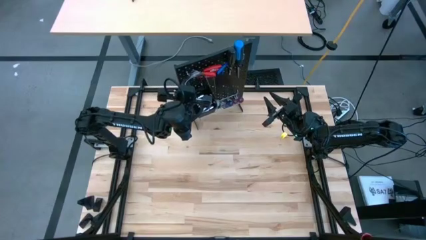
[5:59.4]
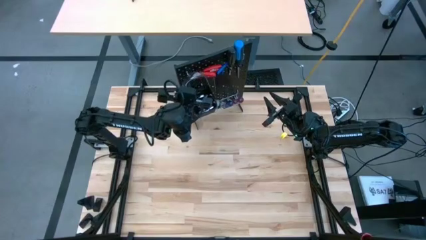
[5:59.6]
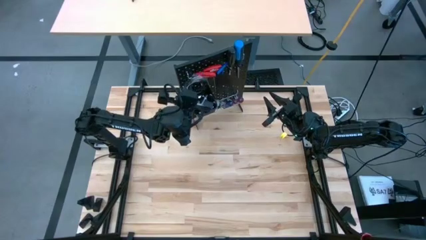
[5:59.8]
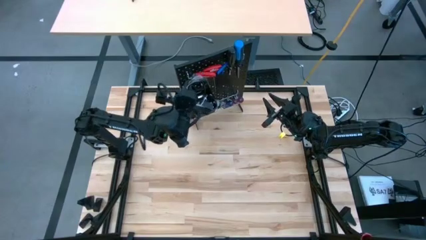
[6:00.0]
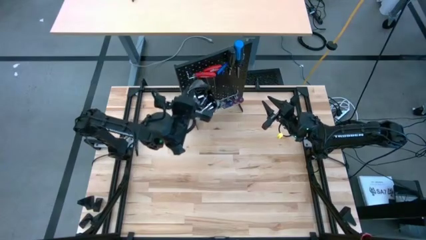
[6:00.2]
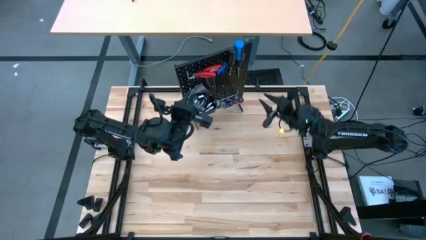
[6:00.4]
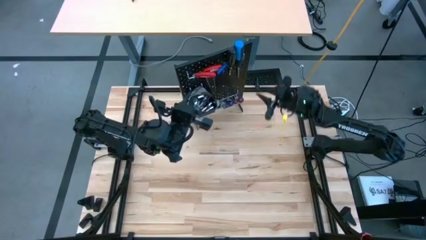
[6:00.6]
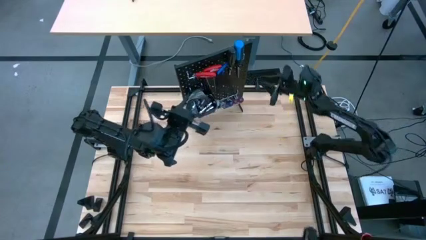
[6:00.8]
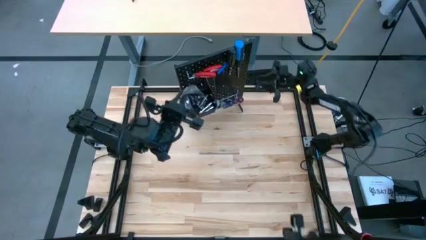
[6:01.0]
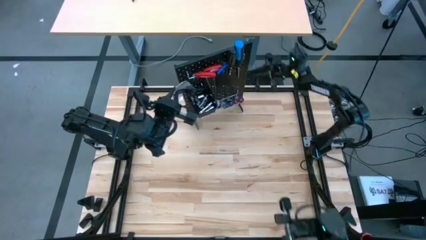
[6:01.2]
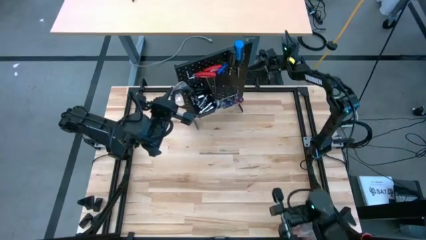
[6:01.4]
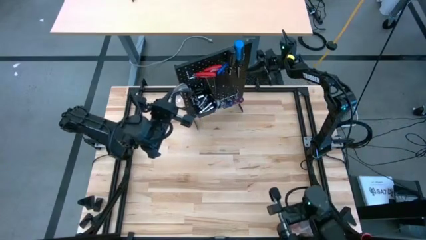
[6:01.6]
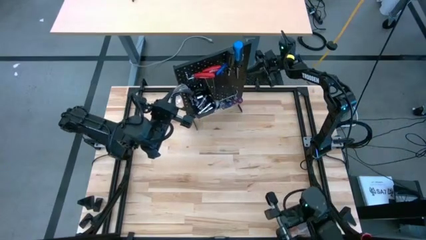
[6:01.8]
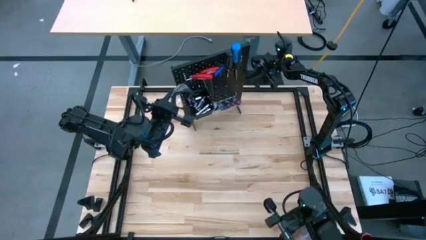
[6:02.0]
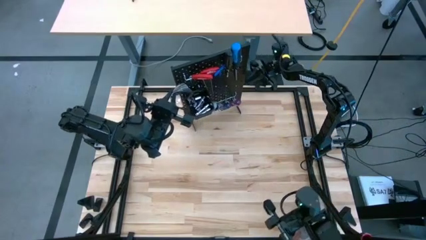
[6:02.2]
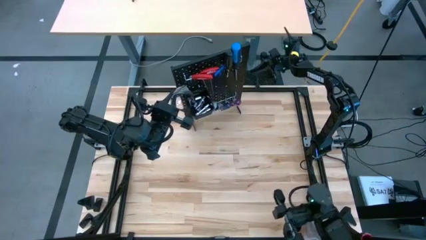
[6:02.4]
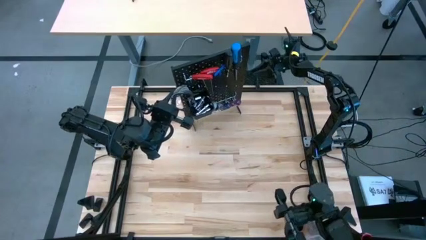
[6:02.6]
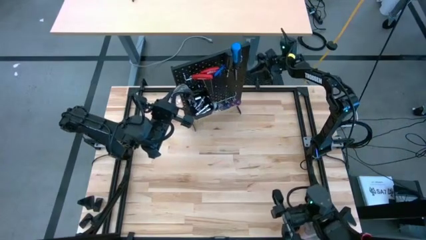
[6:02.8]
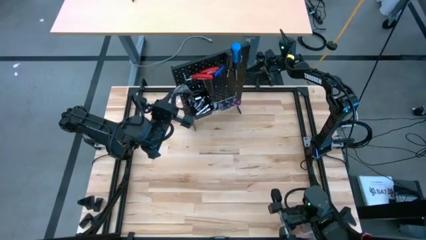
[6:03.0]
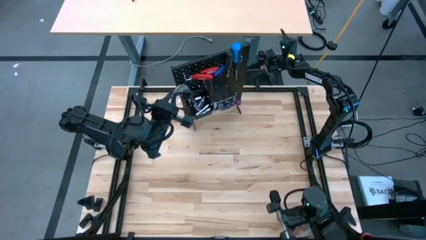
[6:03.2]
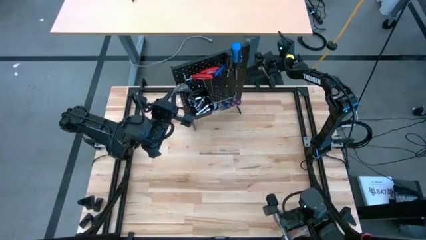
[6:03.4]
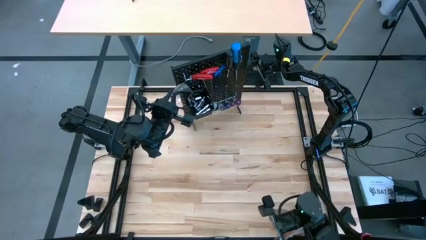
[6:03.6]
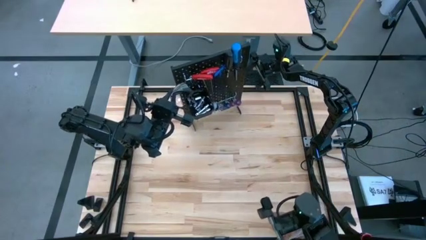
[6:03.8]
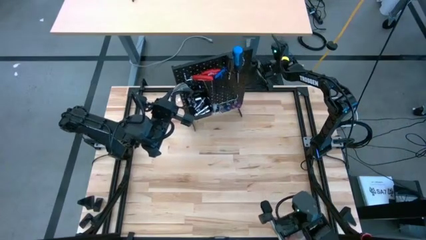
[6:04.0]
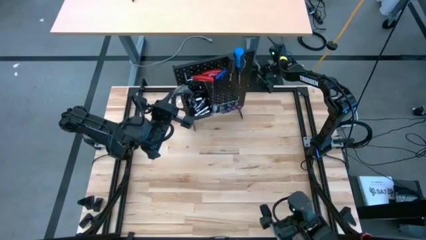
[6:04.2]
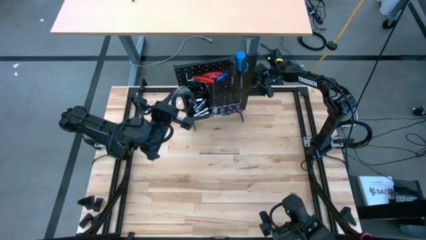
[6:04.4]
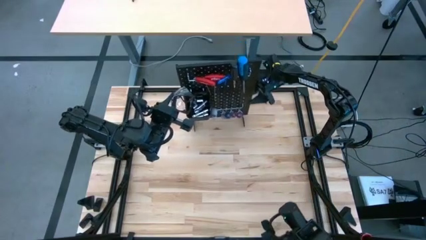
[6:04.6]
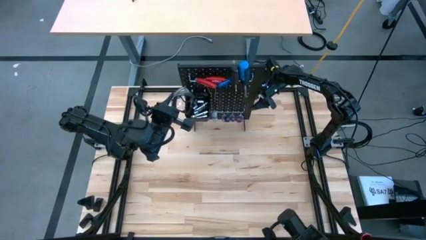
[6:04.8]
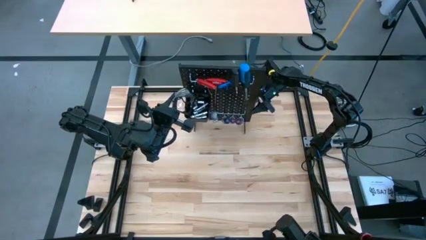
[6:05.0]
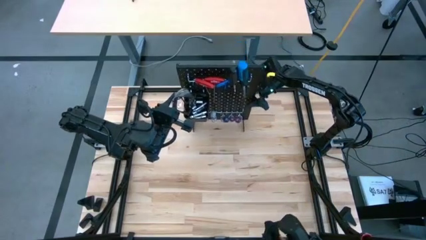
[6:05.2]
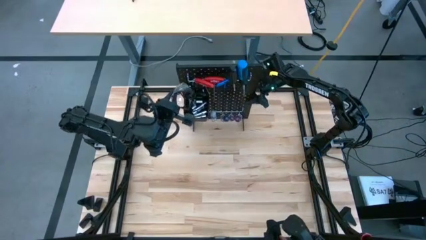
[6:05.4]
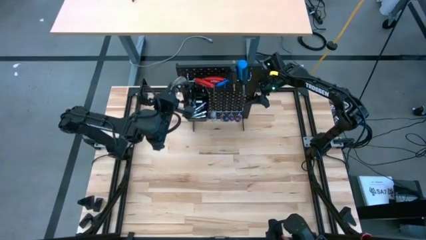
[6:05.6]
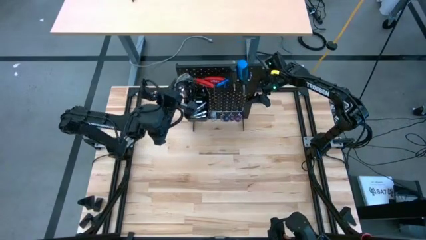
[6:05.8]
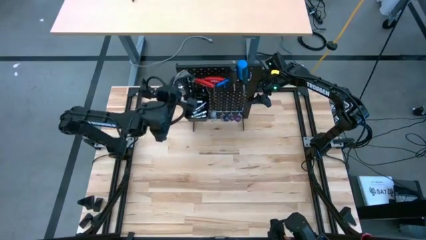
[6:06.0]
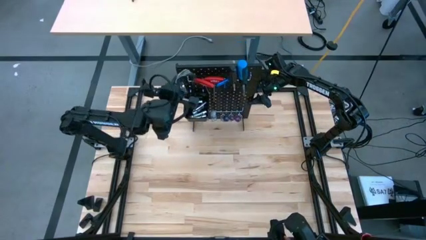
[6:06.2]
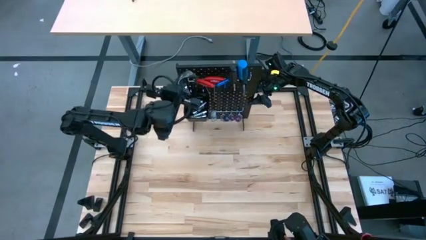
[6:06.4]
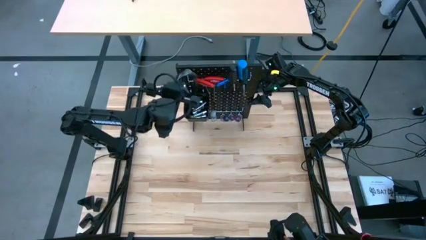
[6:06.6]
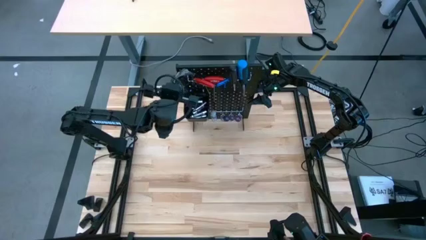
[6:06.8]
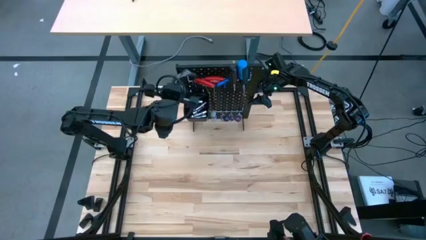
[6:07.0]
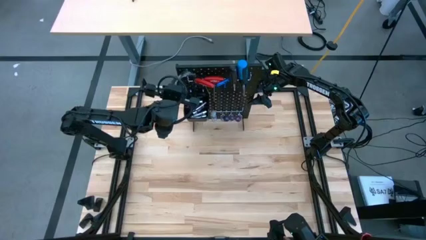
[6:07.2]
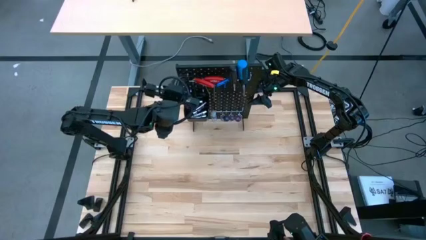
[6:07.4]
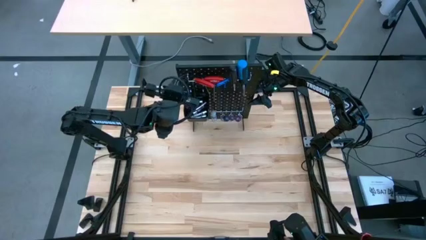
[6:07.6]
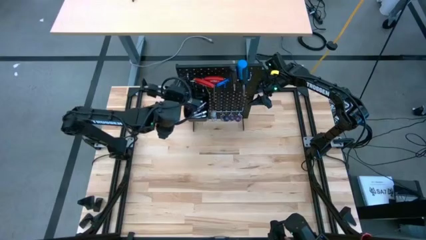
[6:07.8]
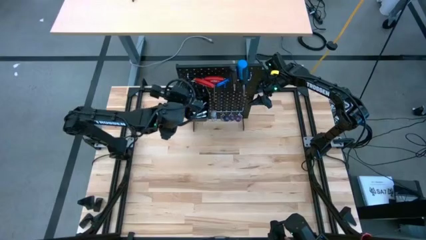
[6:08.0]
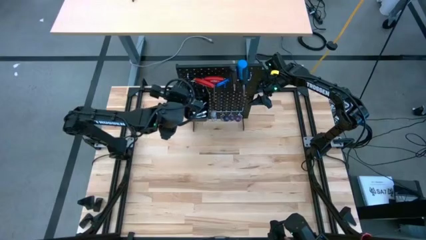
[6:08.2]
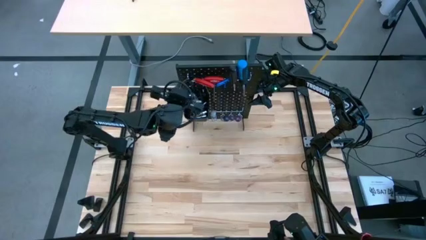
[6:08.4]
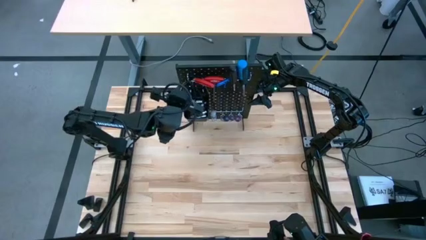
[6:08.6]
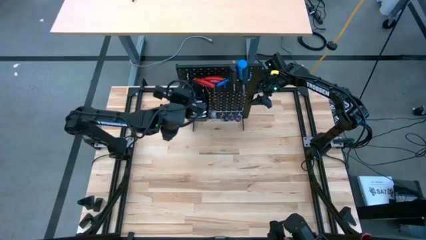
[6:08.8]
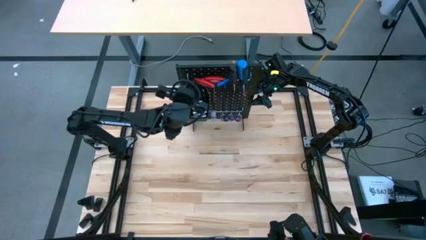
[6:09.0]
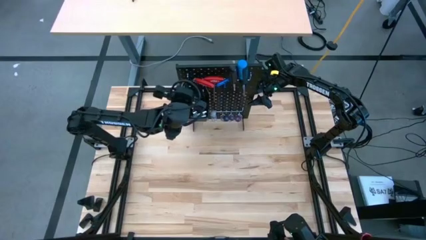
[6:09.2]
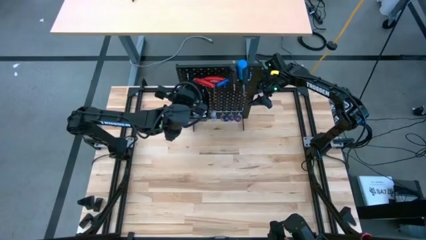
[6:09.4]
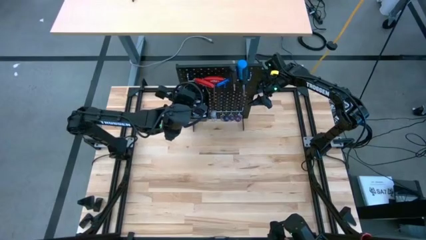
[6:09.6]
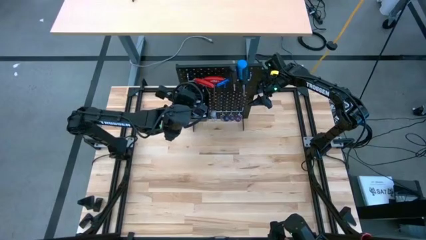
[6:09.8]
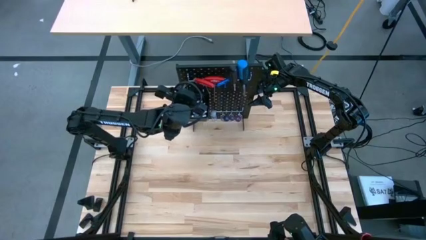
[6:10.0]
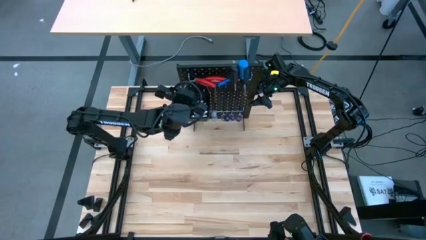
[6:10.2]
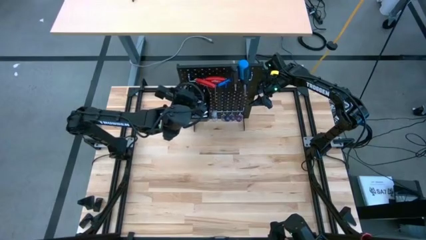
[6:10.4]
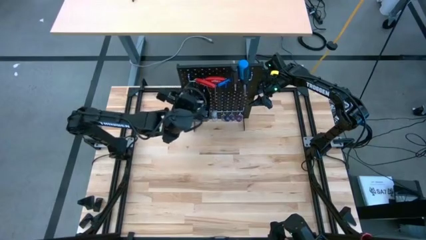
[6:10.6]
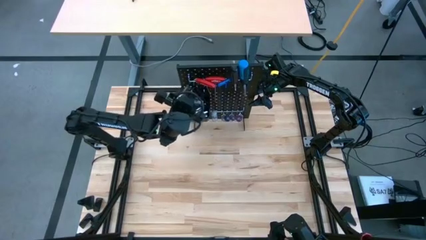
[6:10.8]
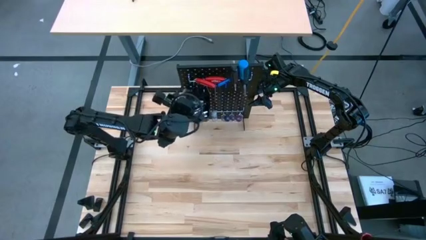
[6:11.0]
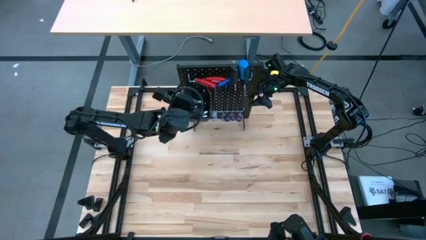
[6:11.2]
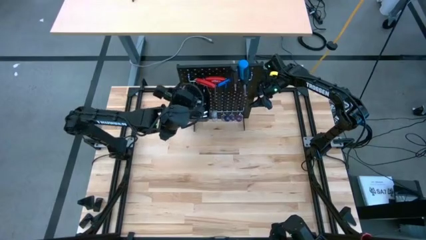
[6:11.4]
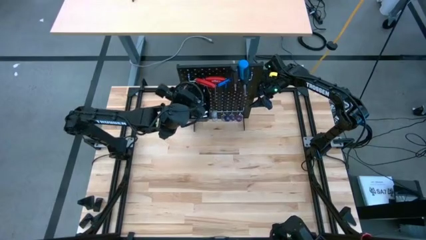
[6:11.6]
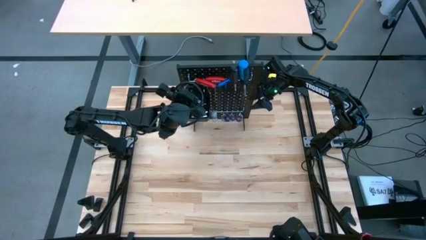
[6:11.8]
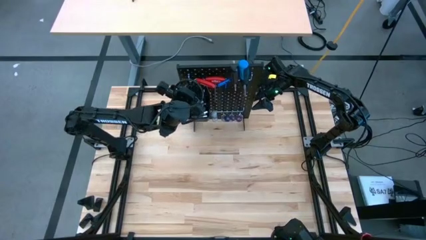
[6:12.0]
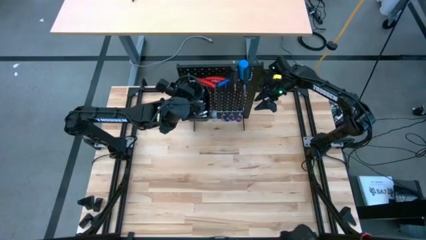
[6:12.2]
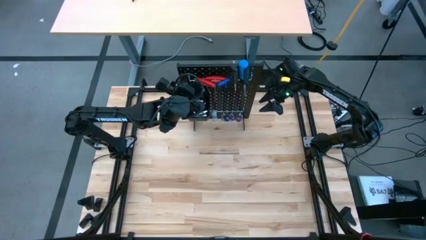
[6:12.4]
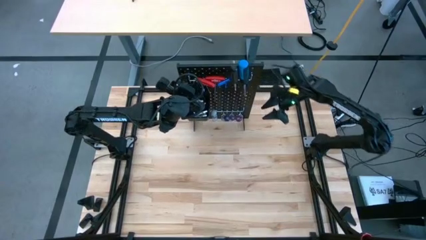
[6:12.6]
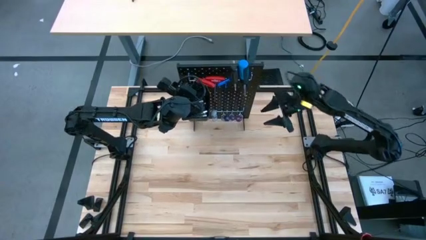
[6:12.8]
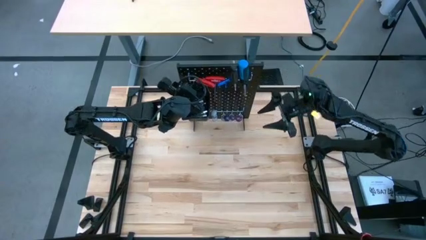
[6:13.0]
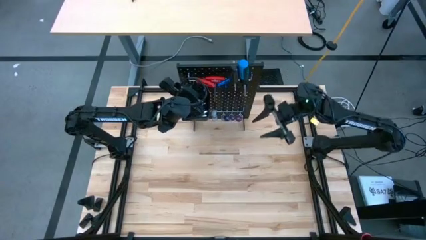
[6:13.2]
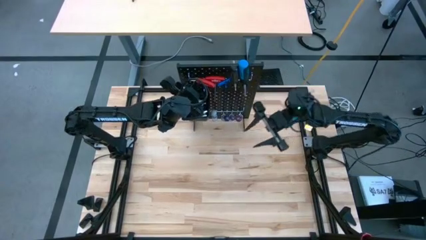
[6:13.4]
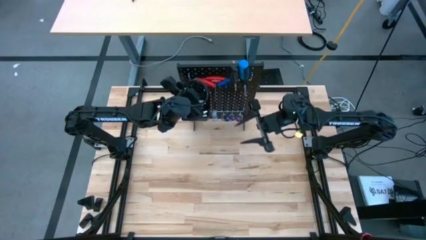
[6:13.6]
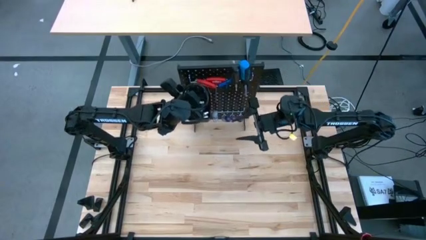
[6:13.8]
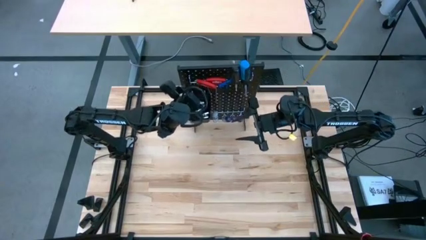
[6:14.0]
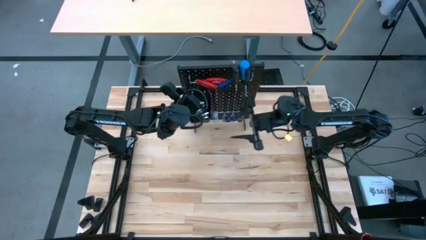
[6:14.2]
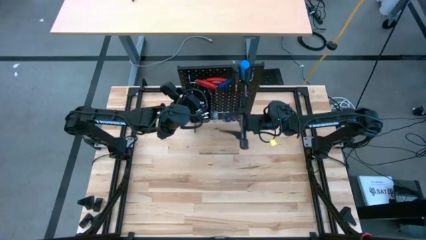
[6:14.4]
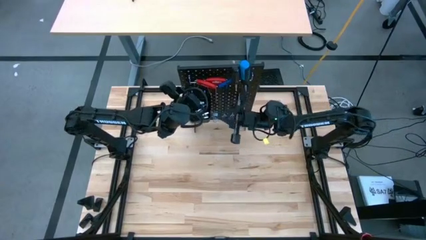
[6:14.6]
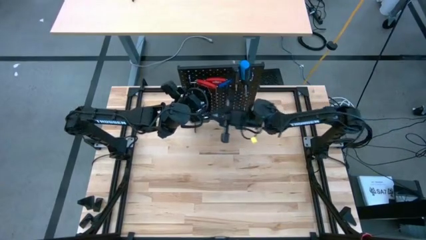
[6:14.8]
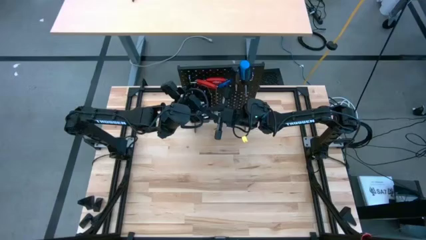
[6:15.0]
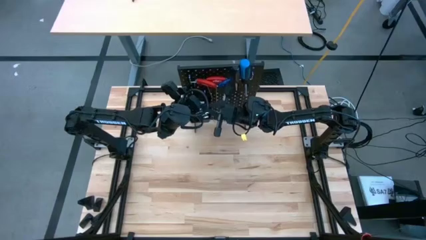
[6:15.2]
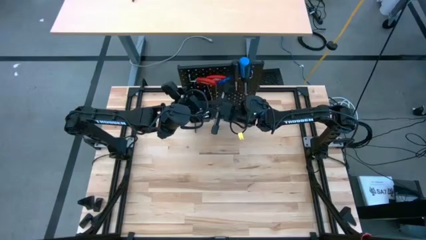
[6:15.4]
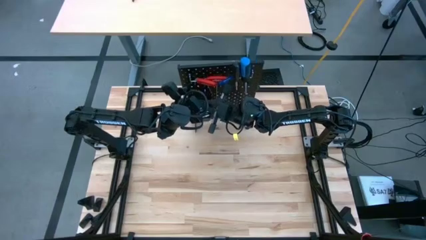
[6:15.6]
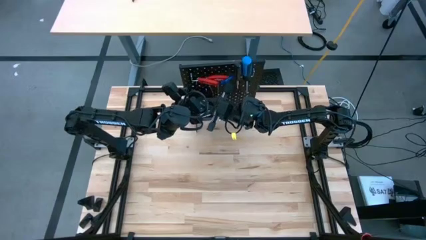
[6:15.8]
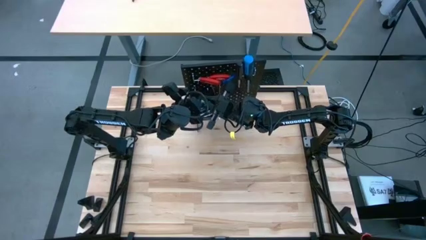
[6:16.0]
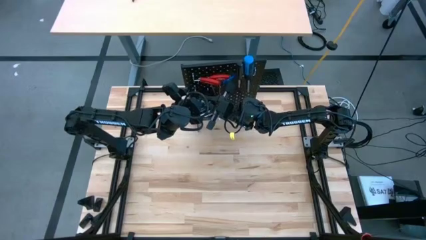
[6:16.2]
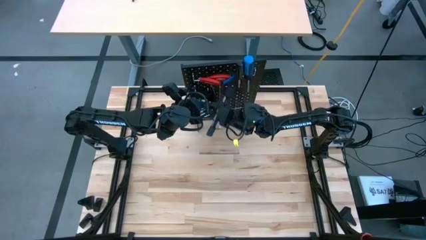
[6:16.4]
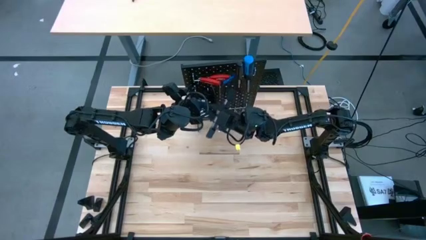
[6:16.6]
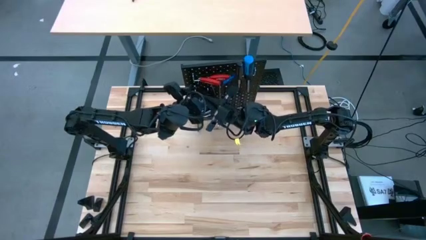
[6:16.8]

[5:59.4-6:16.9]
Task: Hang tools onto peg board
Put the safety glass into the black bin on the pegboard
